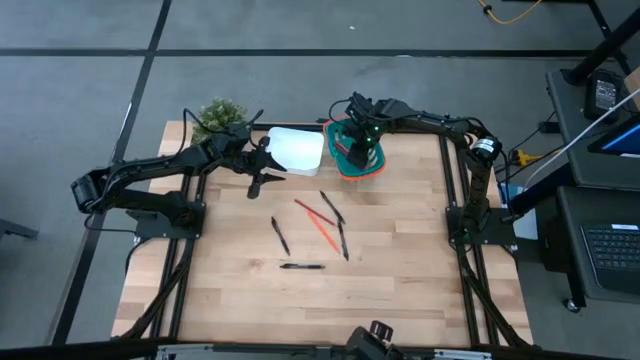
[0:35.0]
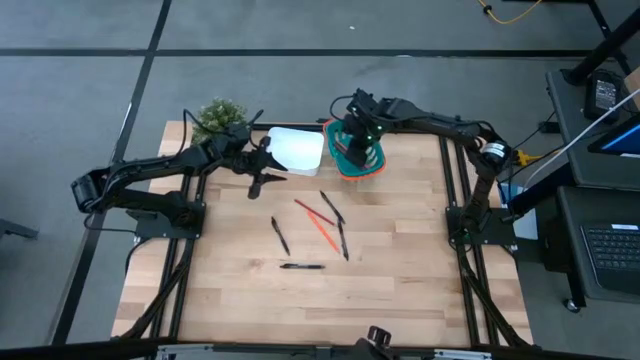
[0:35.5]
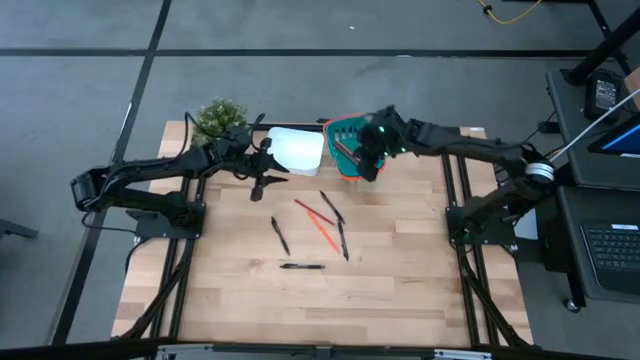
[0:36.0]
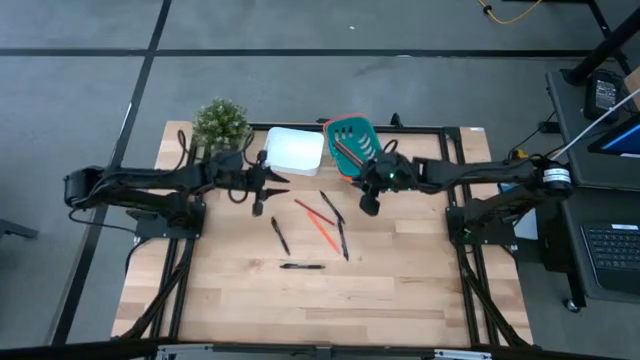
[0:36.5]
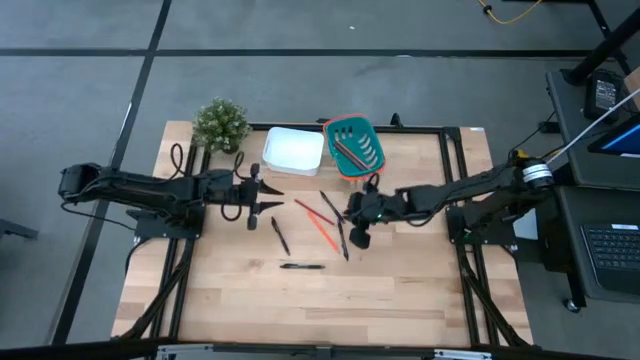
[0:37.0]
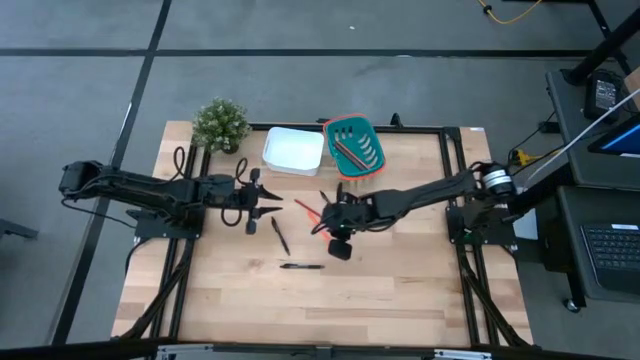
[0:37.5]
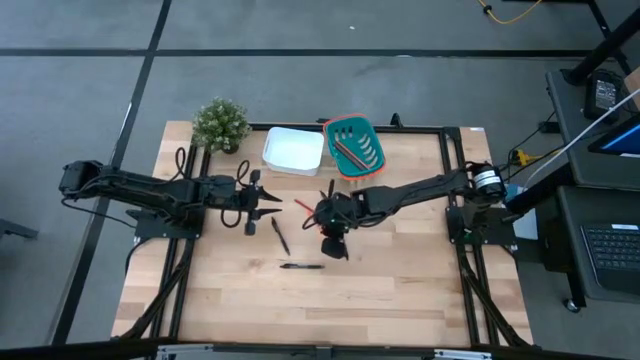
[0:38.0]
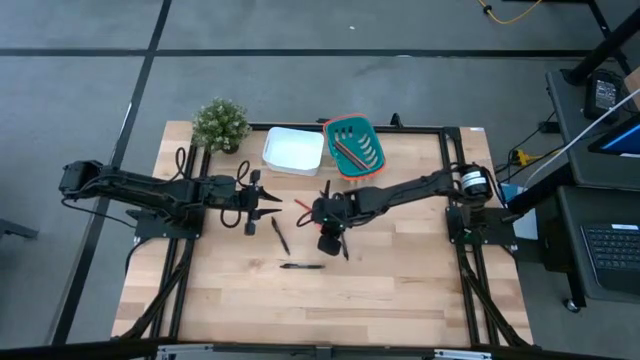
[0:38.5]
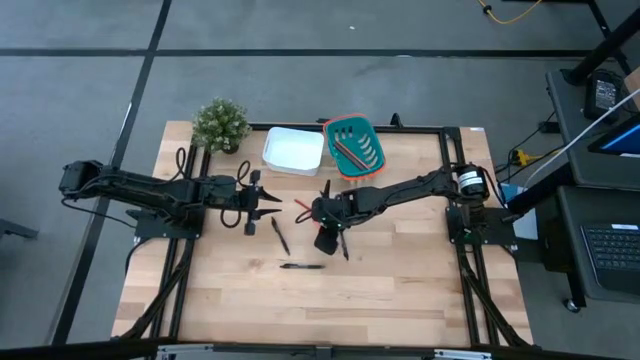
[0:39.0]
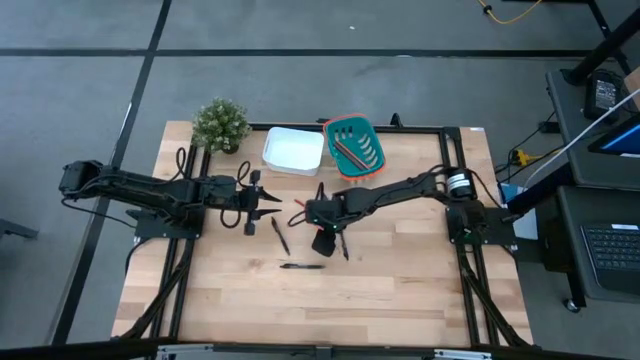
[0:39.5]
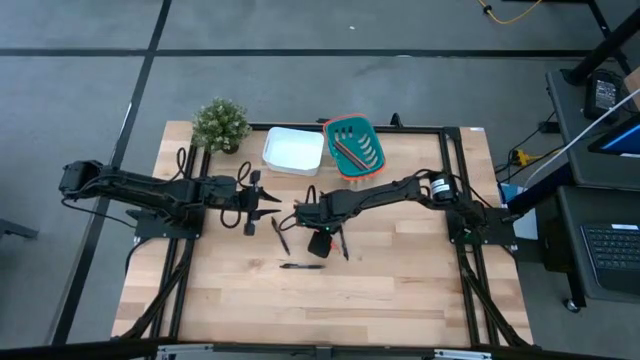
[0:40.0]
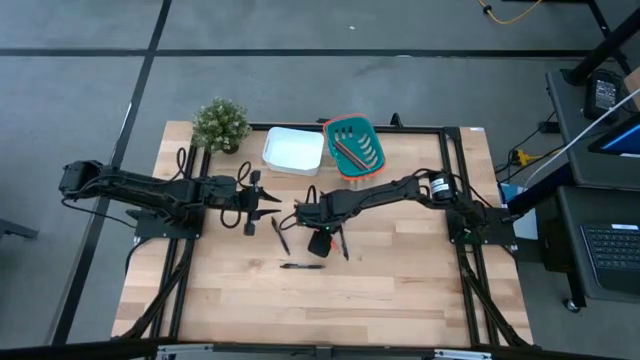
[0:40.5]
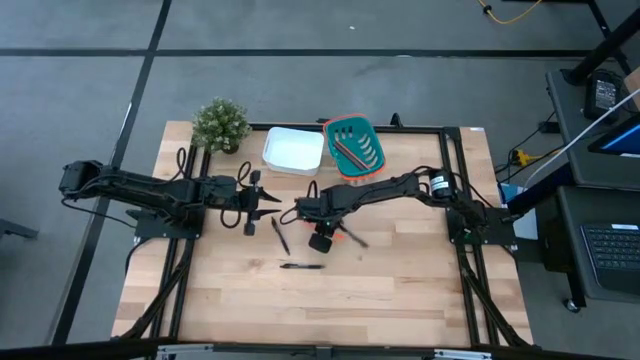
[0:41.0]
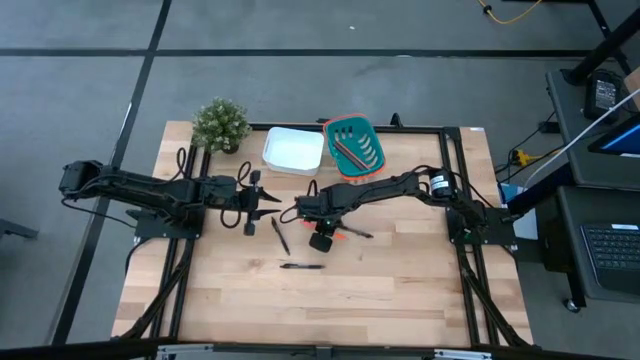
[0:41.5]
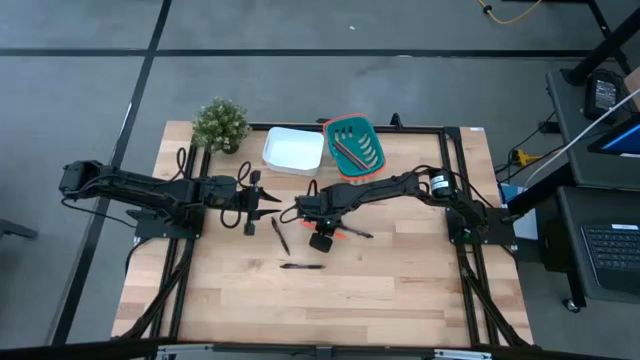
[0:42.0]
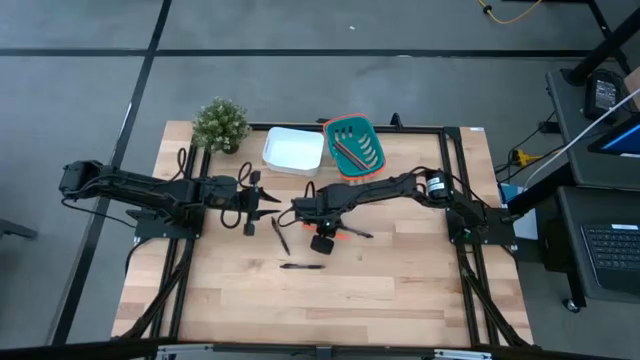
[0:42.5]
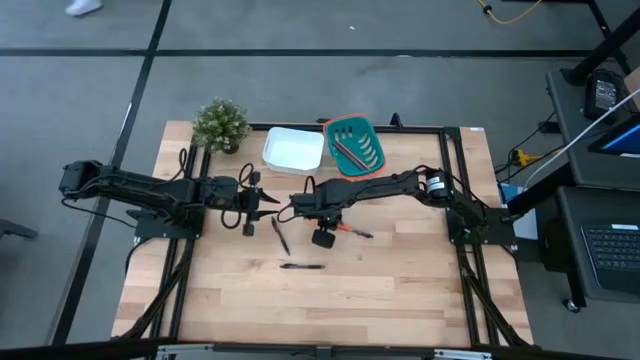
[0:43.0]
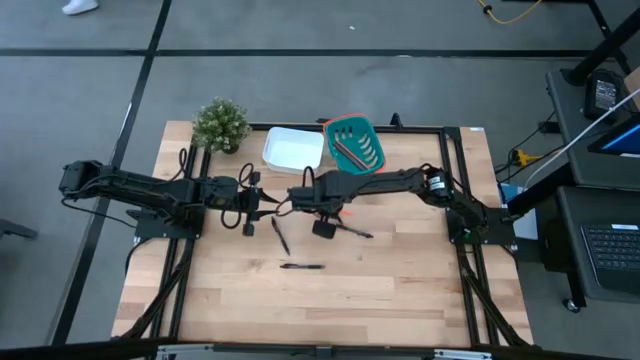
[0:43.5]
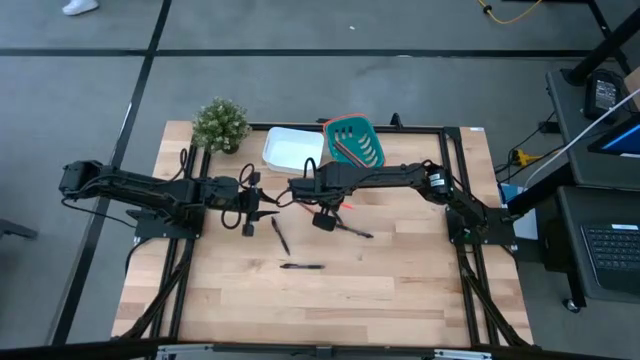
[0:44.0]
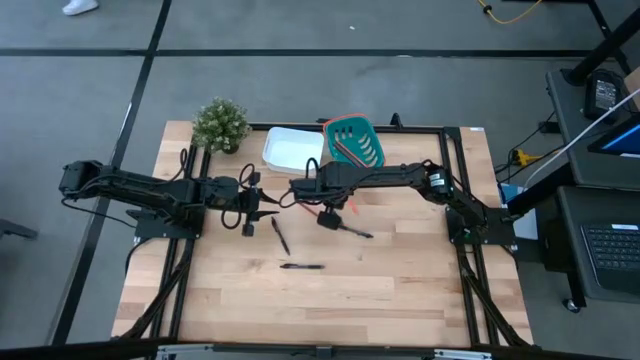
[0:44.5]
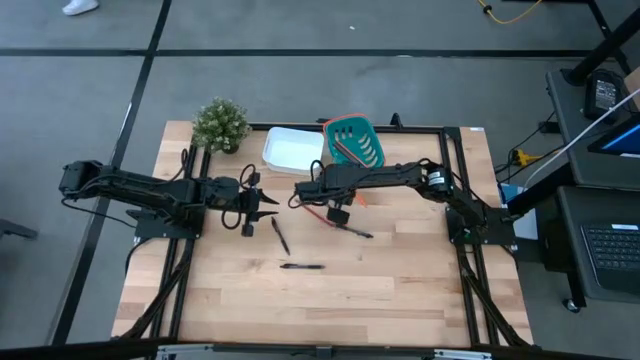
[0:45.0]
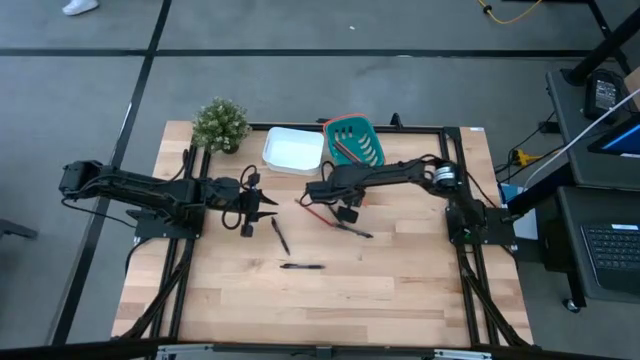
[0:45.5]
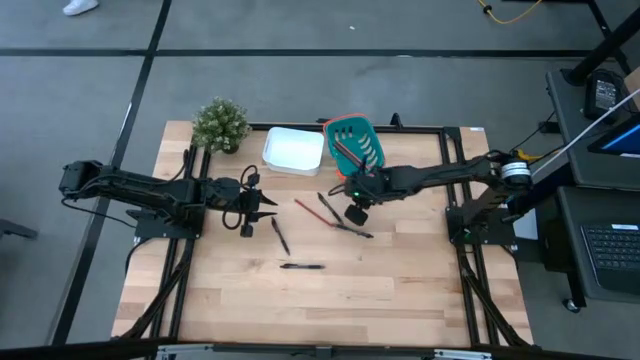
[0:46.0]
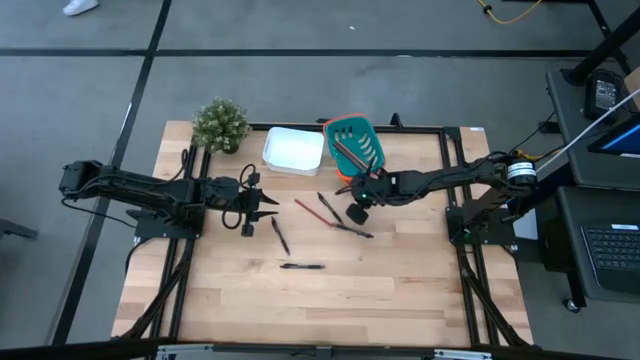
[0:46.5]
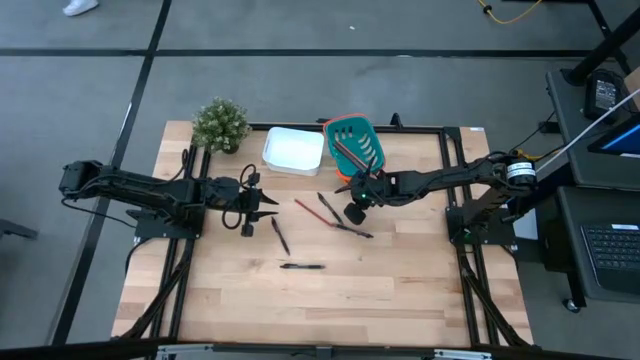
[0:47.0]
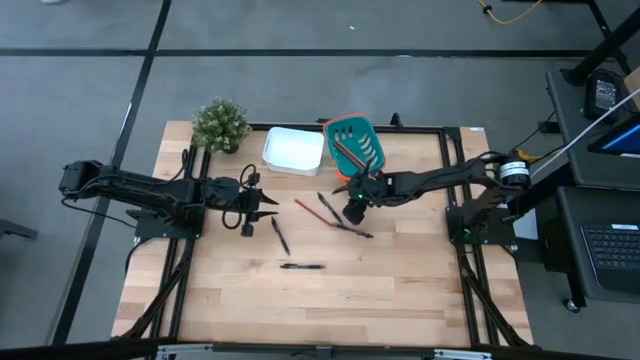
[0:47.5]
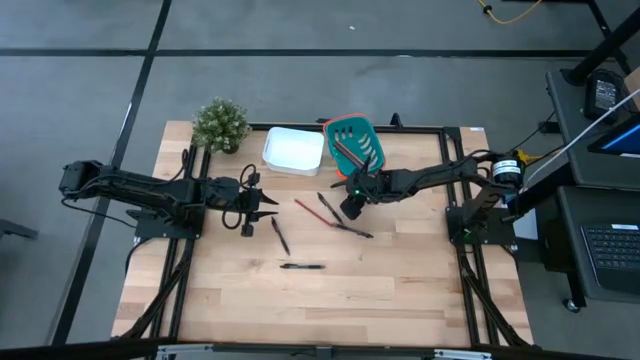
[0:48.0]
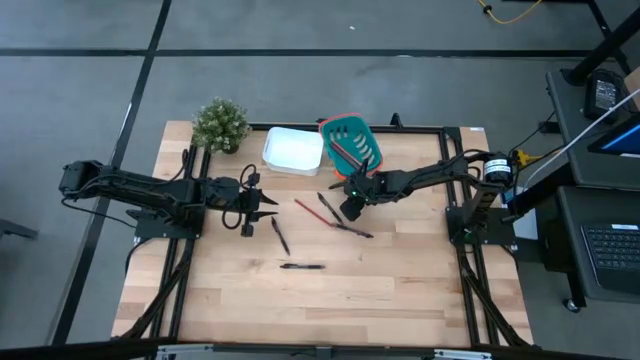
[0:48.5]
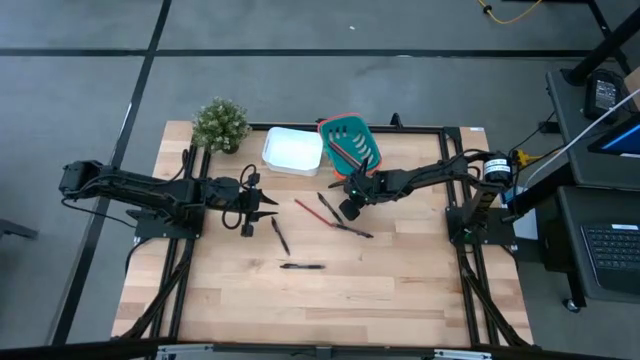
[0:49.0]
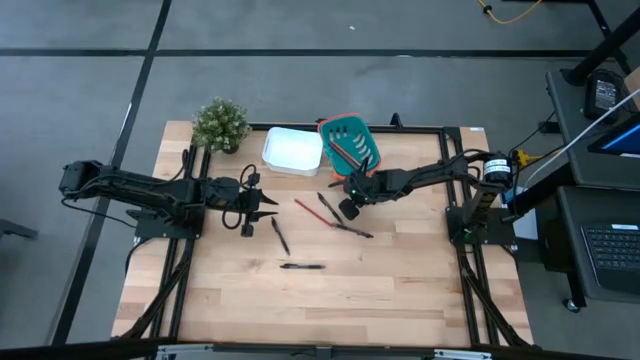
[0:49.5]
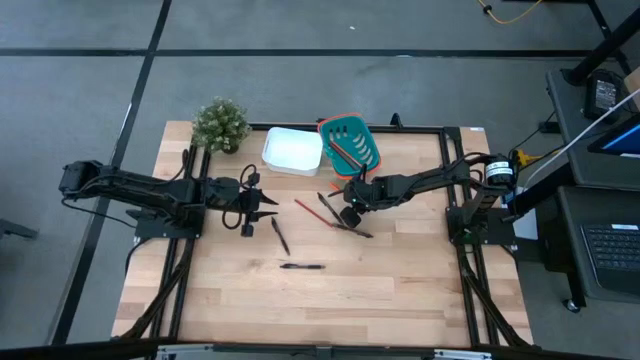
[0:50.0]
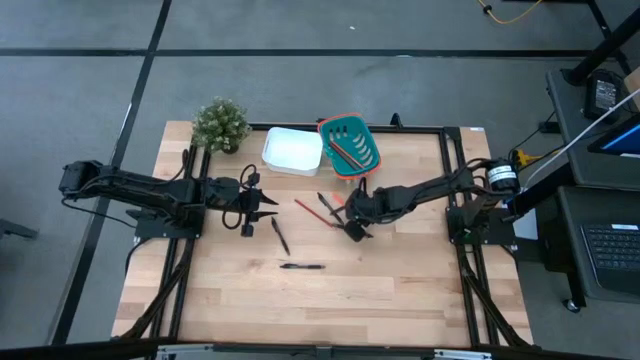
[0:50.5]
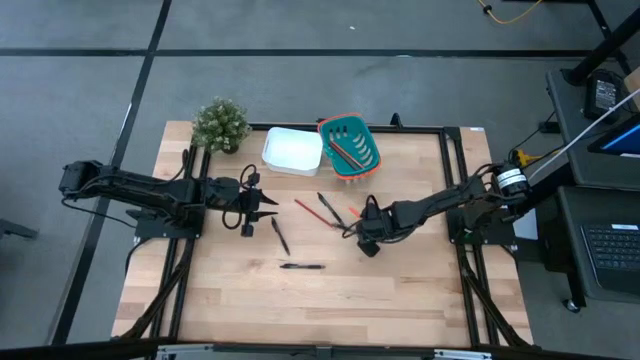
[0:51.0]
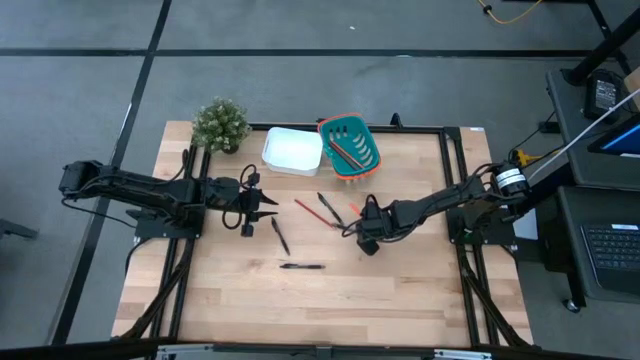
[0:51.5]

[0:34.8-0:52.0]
Task: Sort pens & pencils
Put the orange pencil into the dark green bin

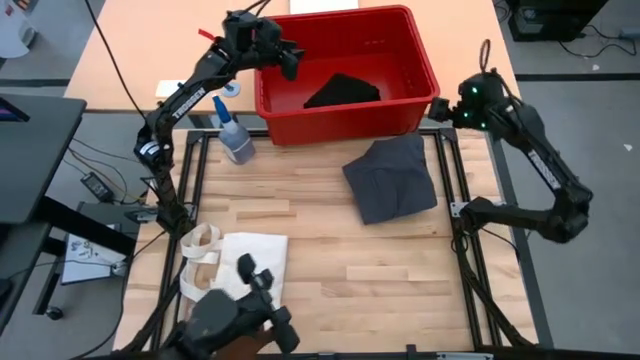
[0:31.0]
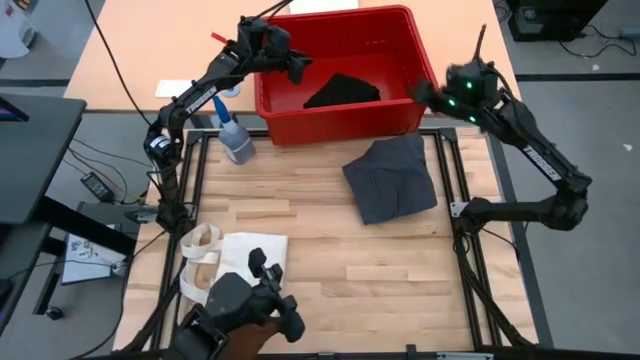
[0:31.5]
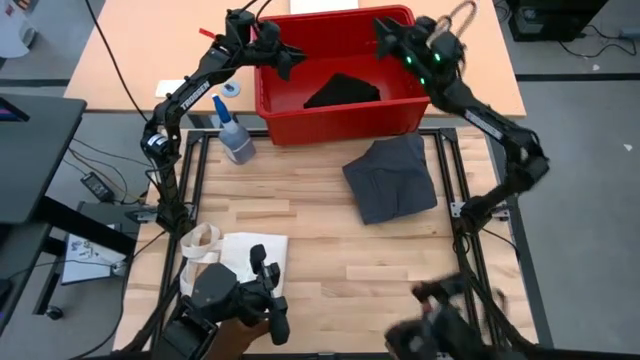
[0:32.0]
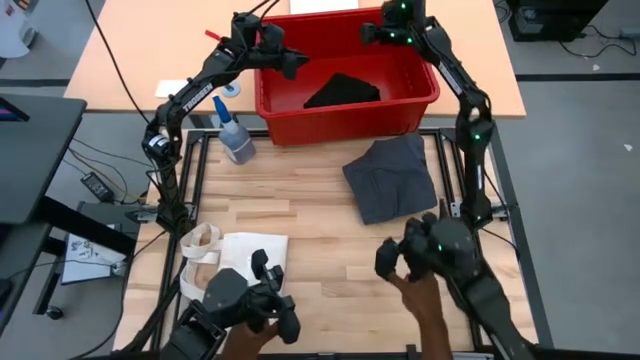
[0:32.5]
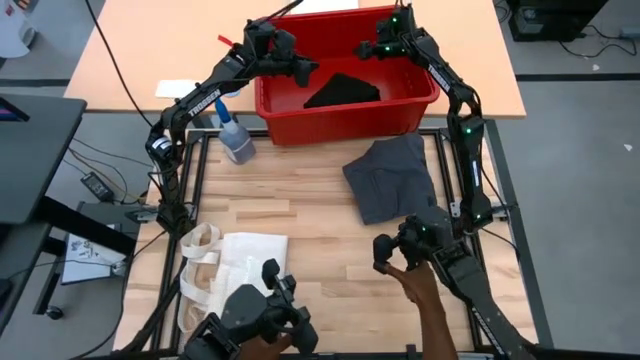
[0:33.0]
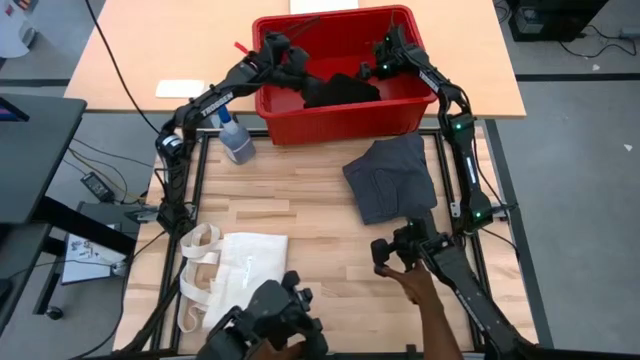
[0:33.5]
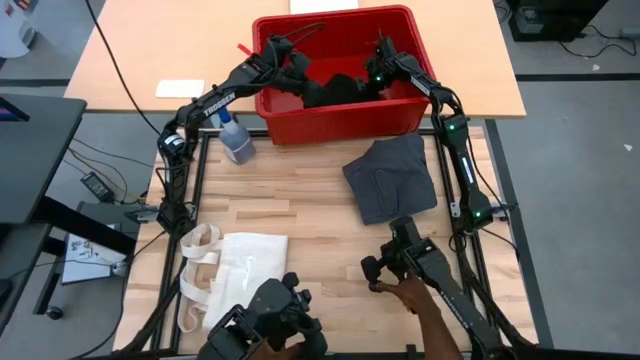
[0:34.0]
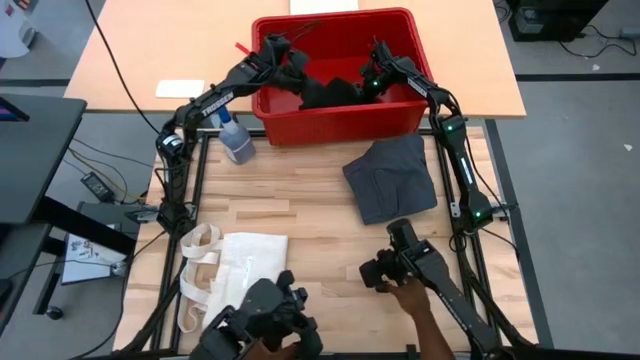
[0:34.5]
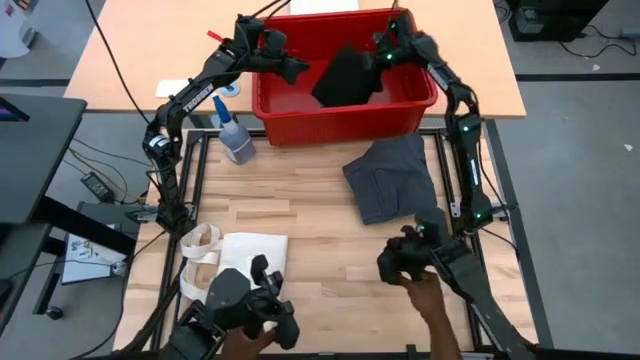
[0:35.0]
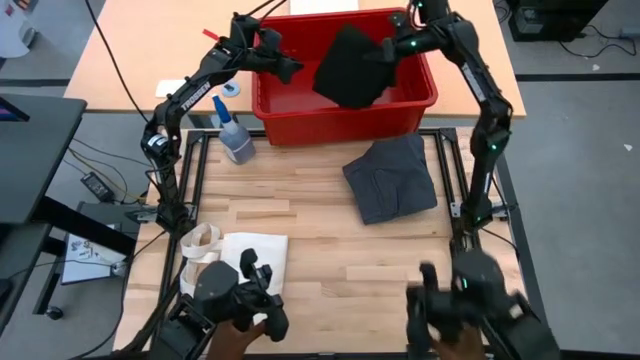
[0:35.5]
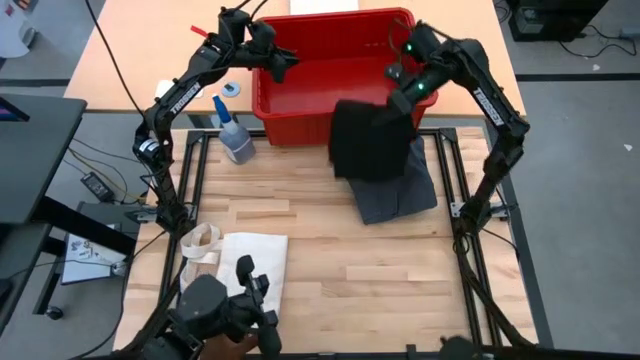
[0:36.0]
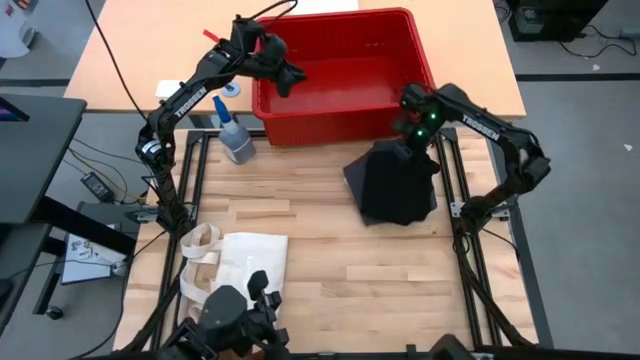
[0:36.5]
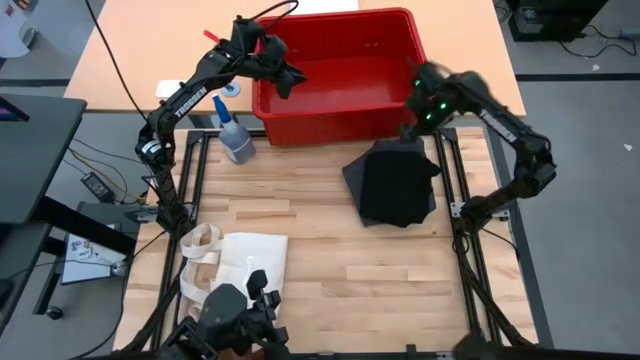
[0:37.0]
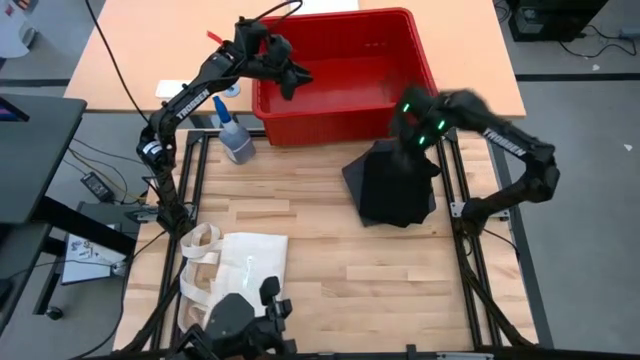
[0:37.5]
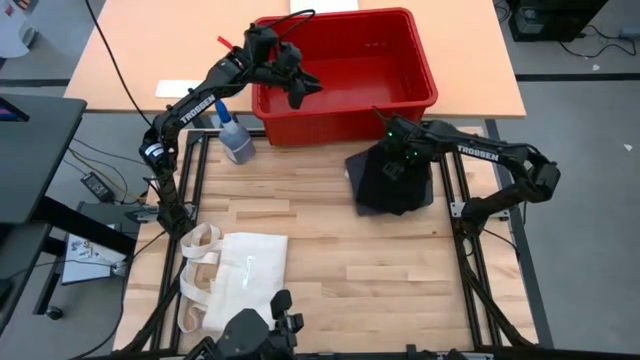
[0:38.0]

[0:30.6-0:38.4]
Task: Fold laundry
Remove the folded black pants from the red bin
